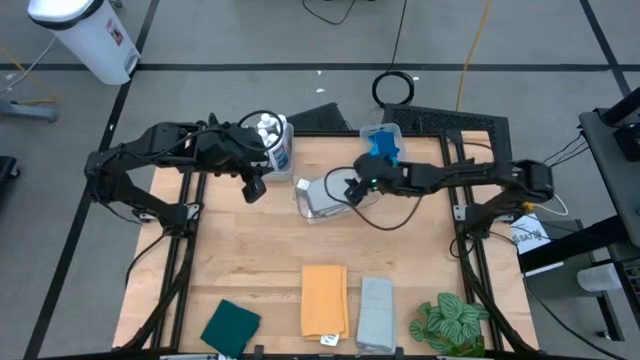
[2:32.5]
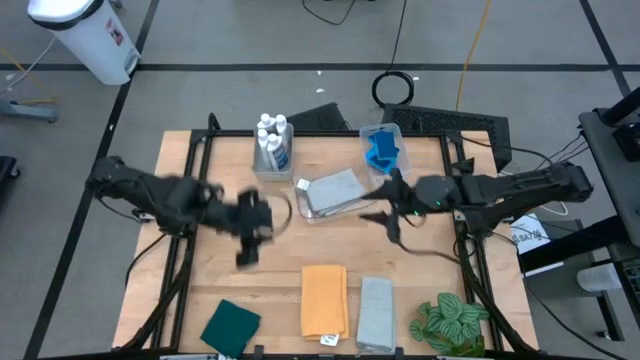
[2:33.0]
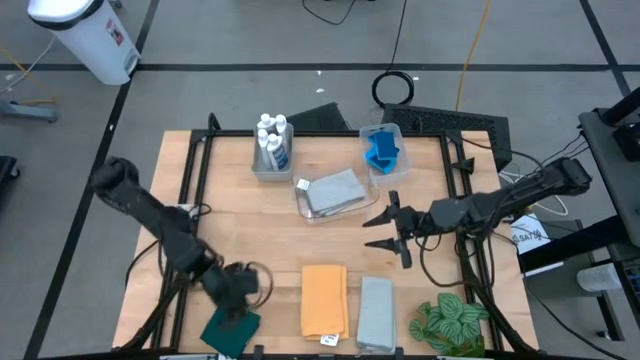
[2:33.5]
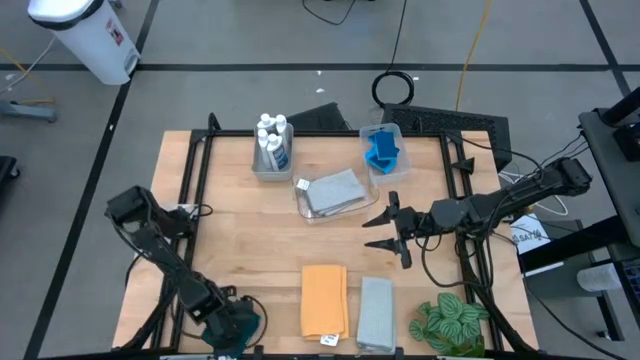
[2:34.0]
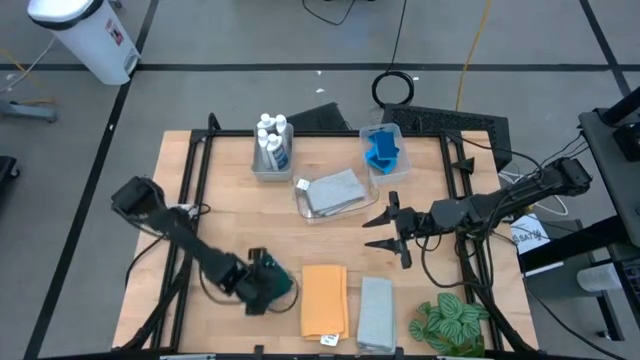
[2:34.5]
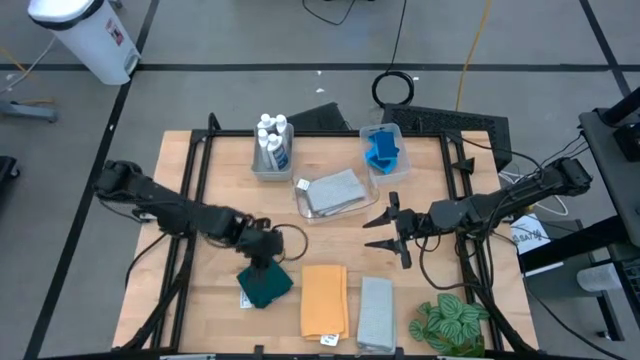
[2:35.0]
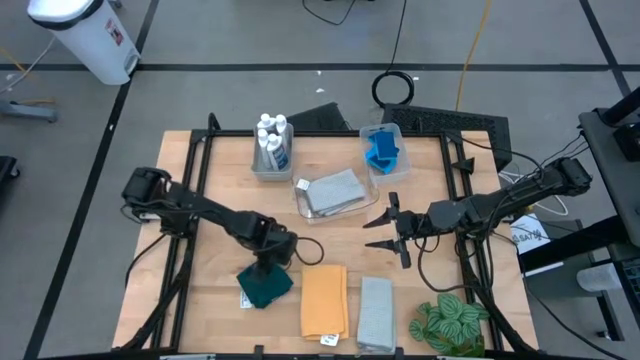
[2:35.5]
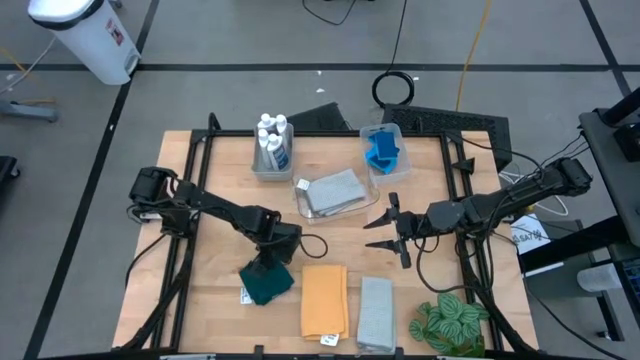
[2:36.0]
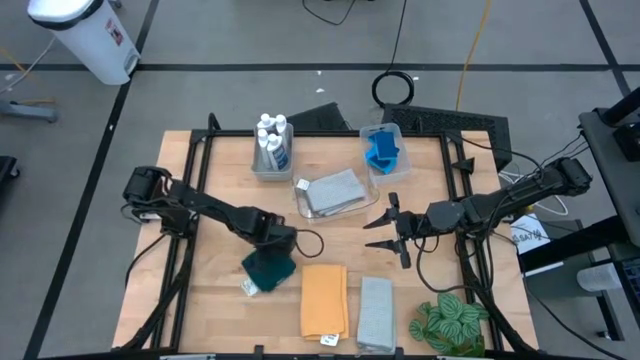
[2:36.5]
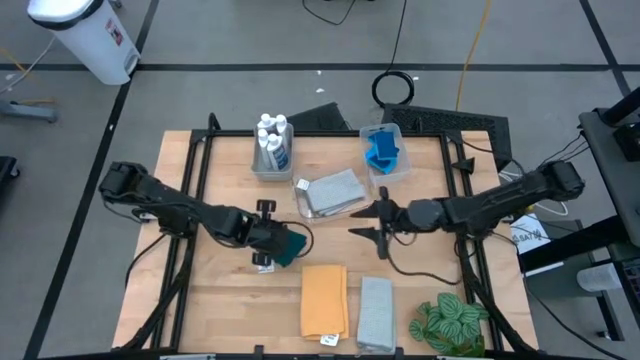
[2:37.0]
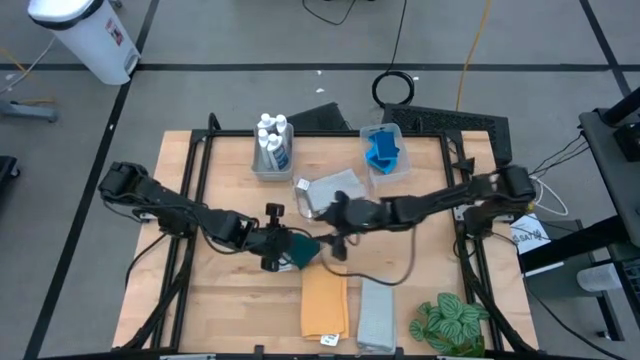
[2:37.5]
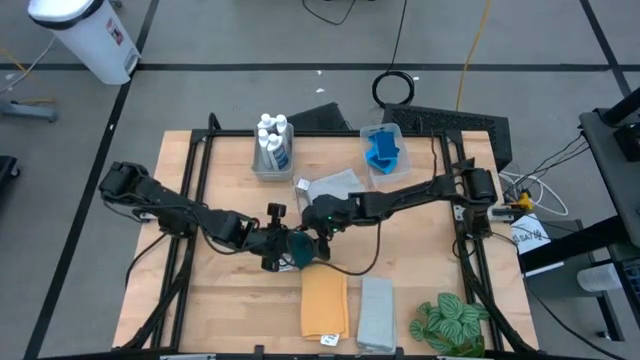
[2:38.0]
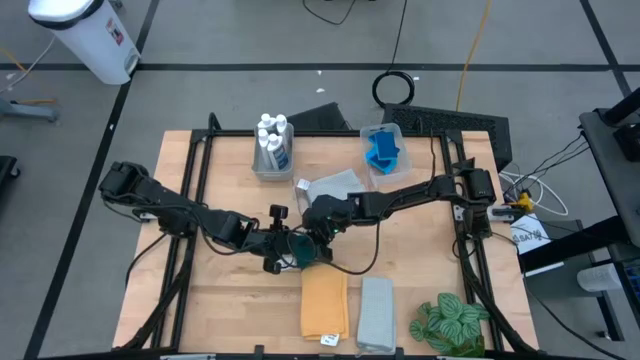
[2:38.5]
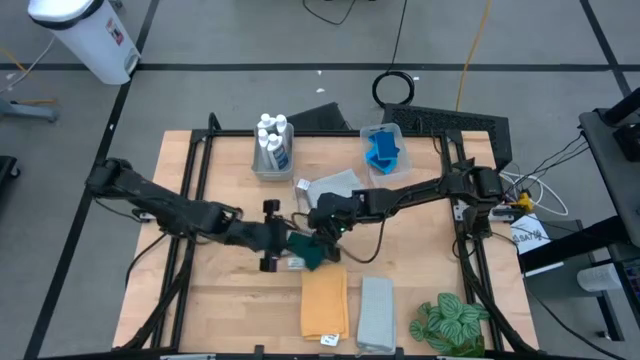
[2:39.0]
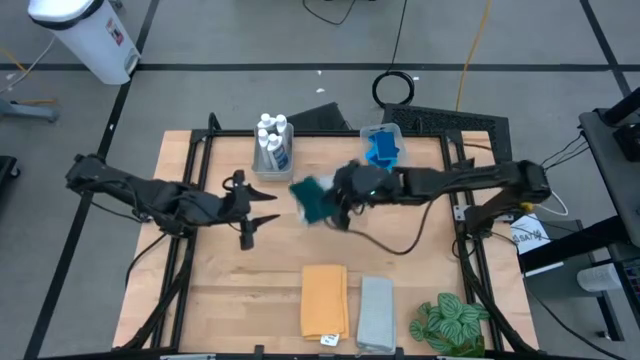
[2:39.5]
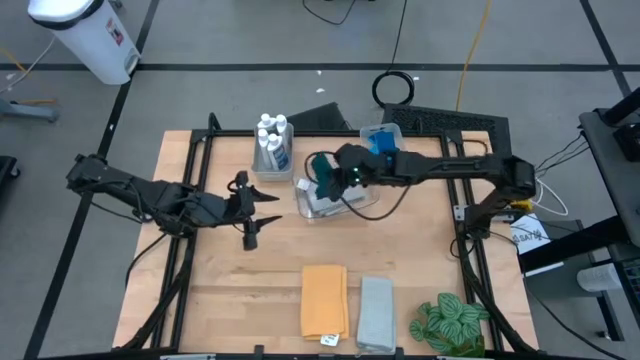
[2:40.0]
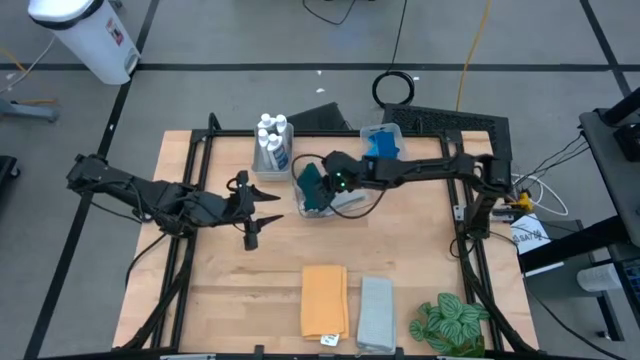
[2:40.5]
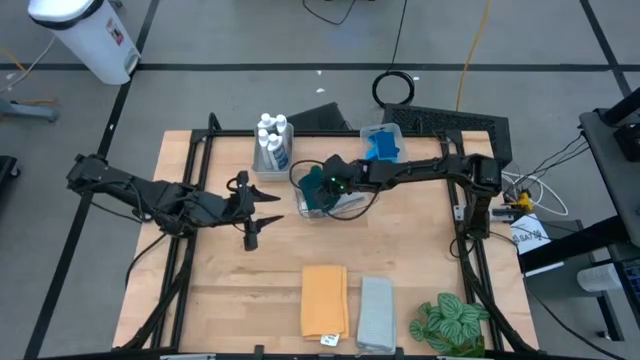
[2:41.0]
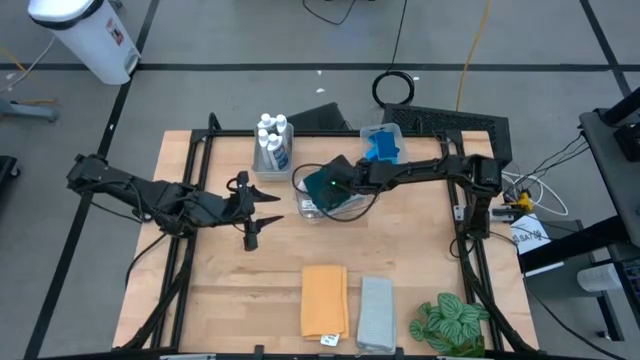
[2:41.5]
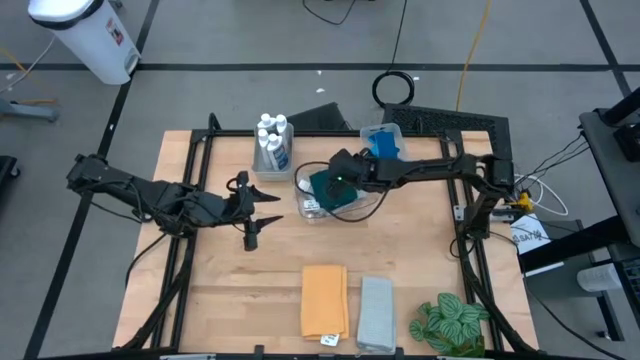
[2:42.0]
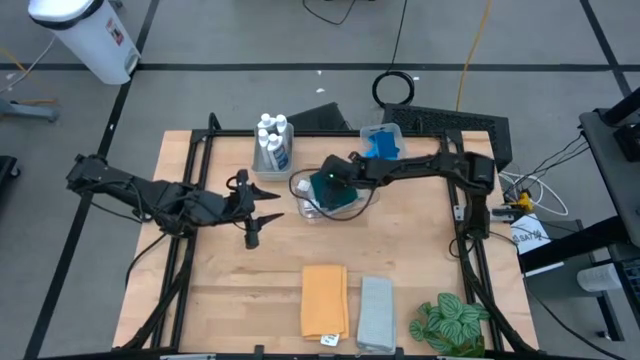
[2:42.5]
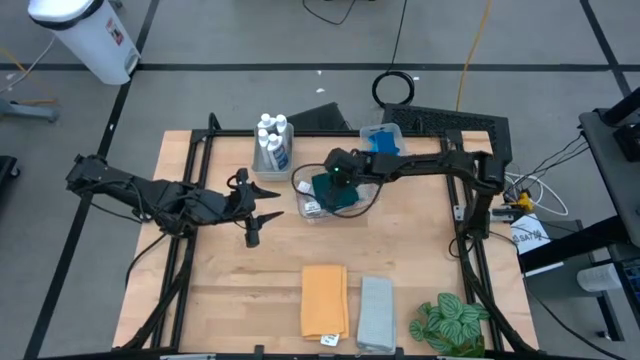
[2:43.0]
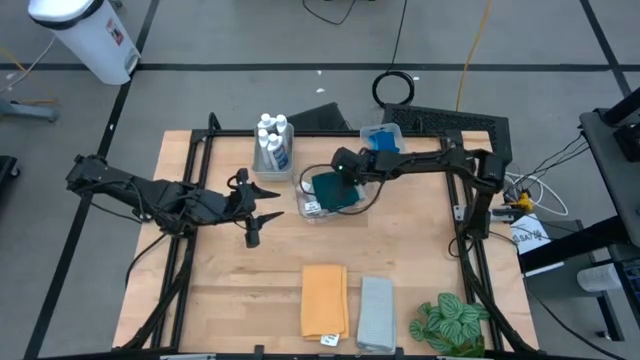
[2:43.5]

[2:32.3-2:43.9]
Task: Pick & Place Kitchen Items
Put the blue towel into the transparent bin

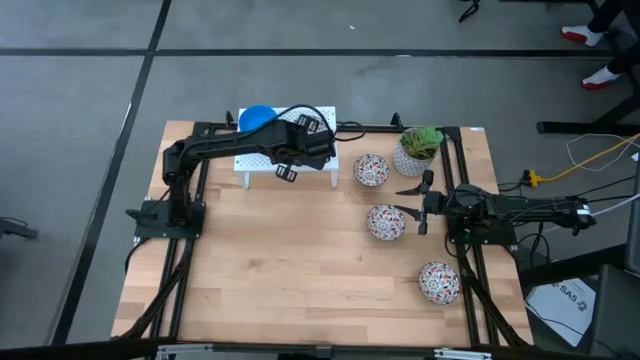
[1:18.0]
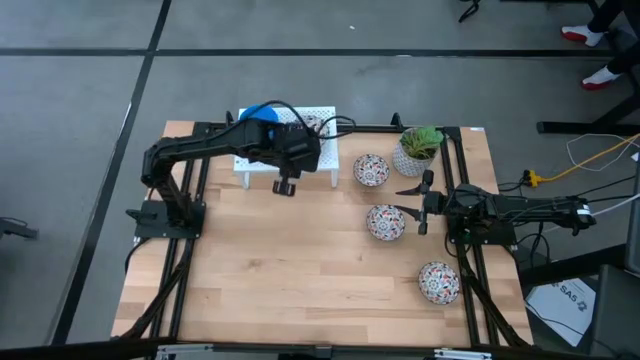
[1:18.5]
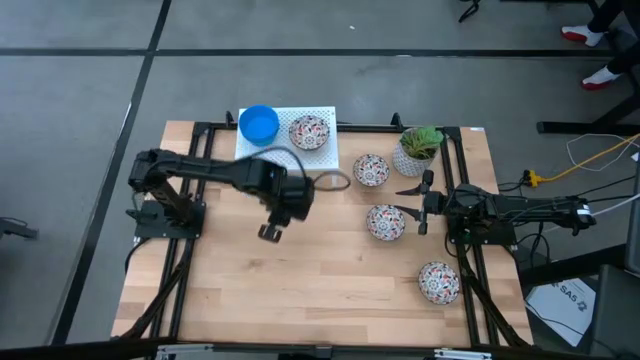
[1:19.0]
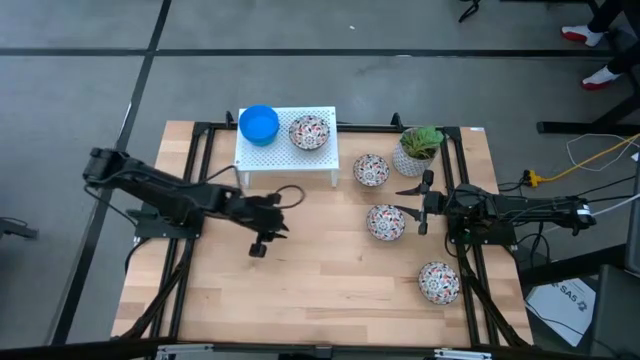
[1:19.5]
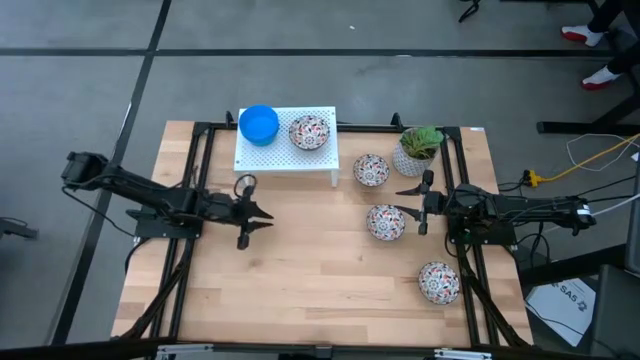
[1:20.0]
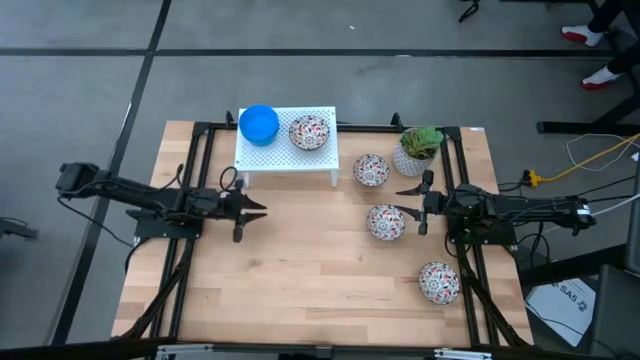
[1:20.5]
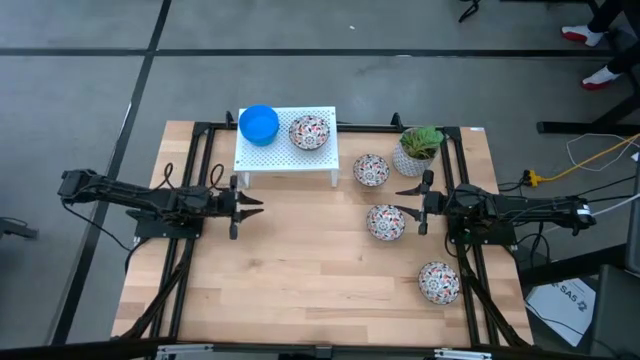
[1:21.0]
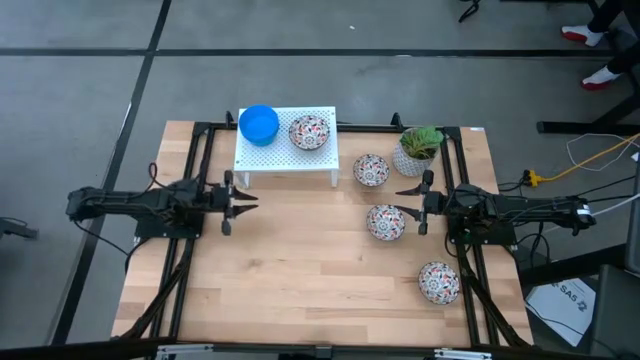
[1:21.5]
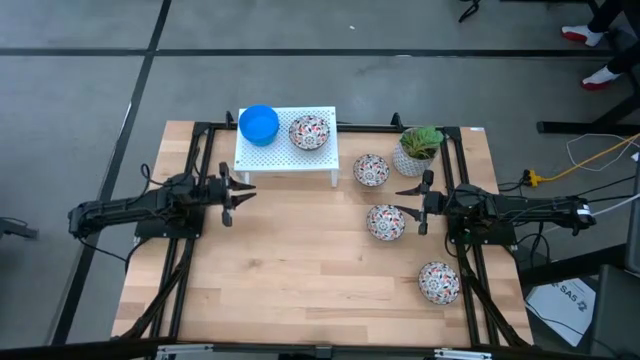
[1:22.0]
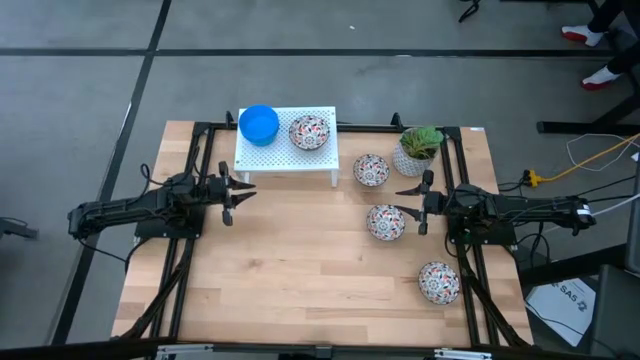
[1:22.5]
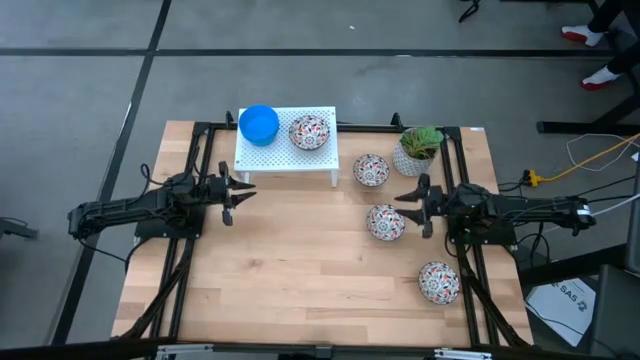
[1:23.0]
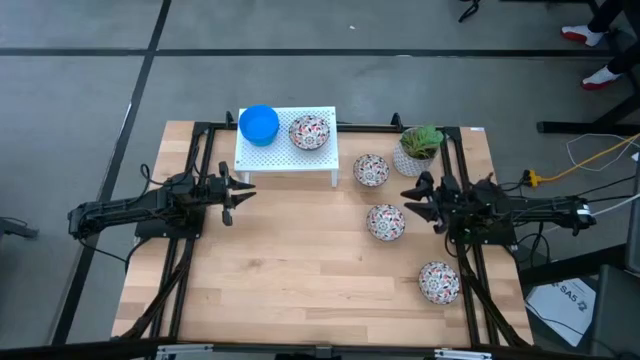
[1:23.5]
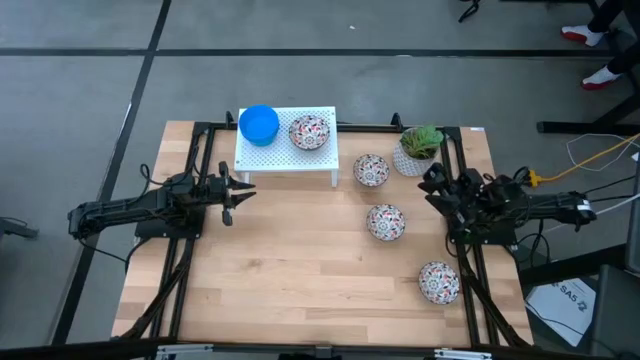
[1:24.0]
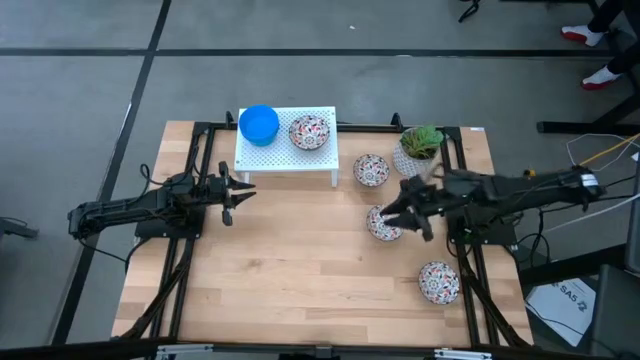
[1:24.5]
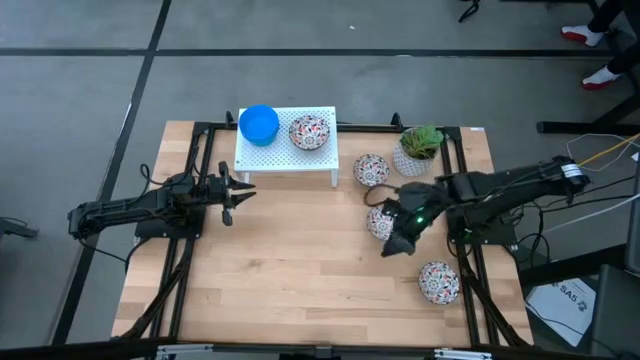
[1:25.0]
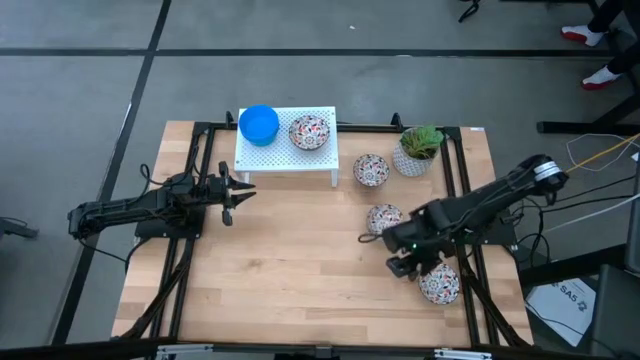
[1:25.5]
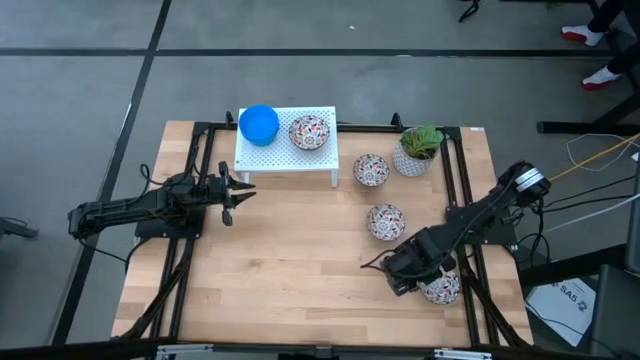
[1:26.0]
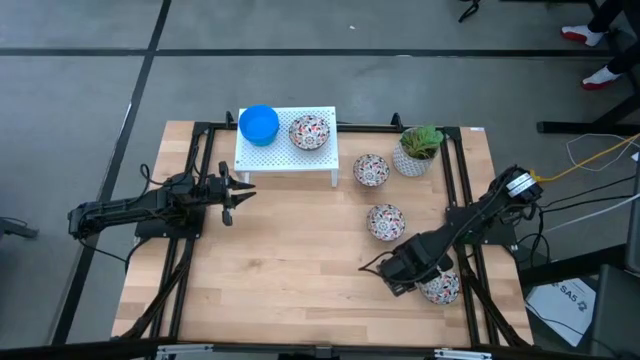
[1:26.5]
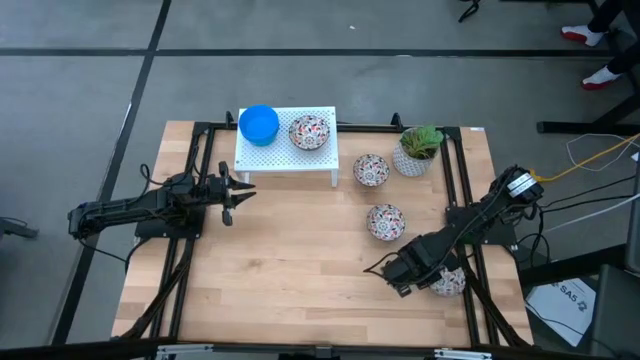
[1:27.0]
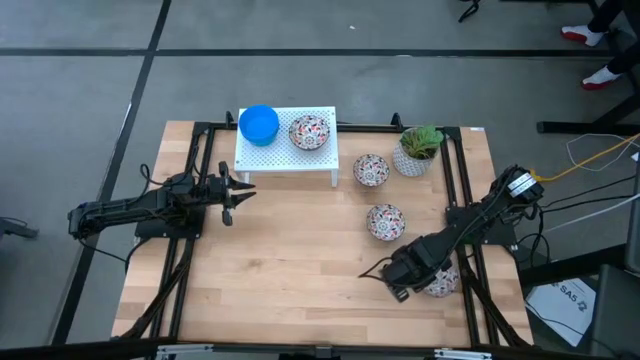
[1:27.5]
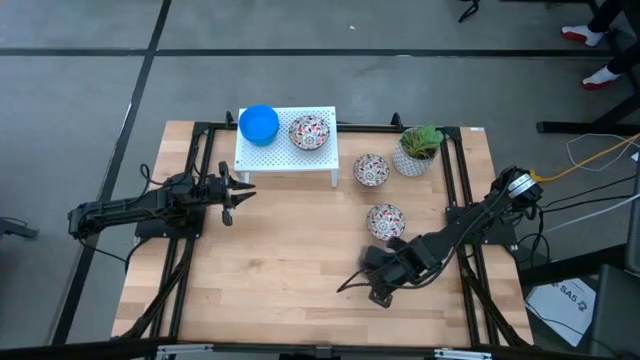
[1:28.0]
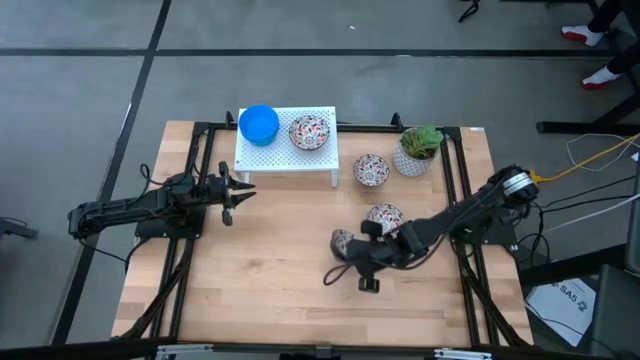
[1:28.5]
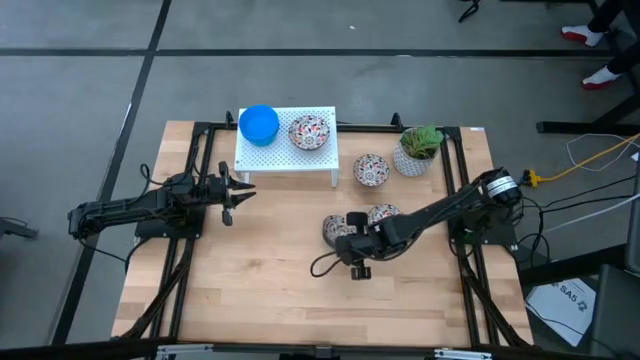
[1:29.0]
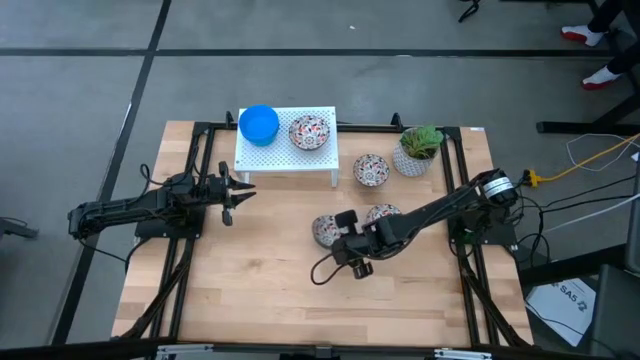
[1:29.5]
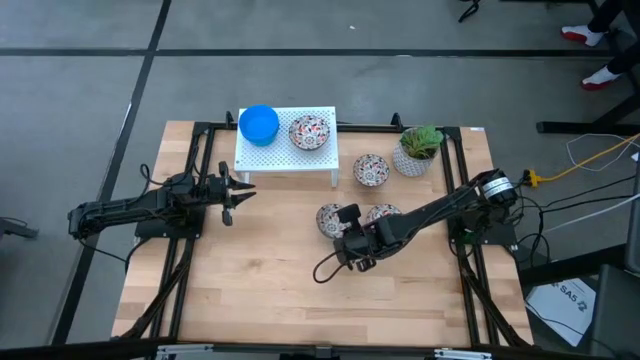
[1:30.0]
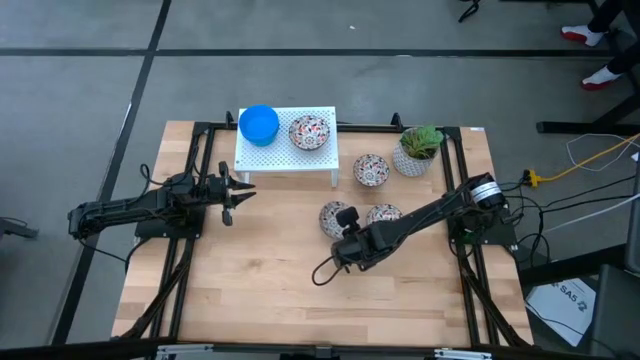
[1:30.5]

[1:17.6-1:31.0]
Task: Pick & Place Mini bowls
Stack the patterned black bowl on the patterned black bowl on the shelf
